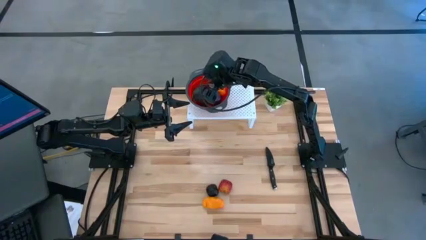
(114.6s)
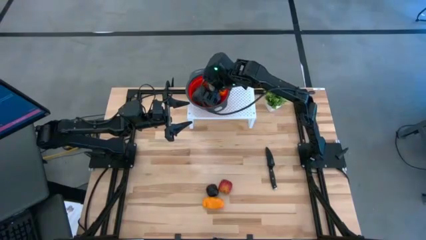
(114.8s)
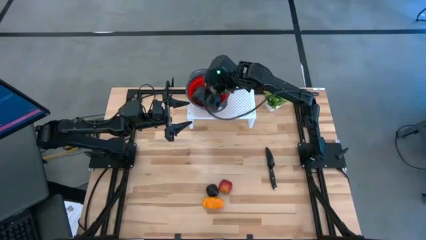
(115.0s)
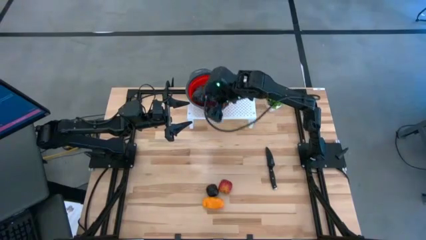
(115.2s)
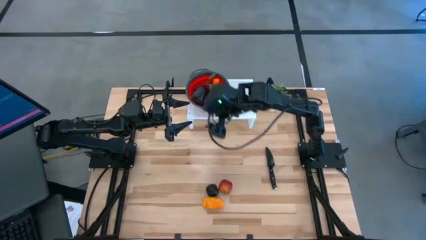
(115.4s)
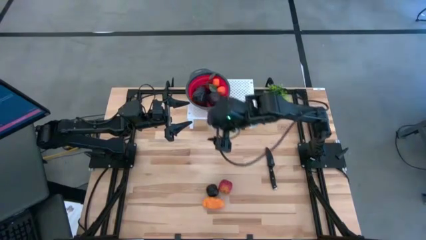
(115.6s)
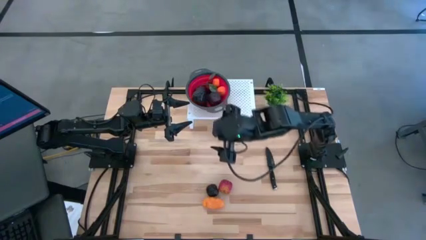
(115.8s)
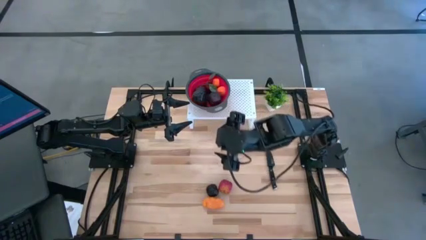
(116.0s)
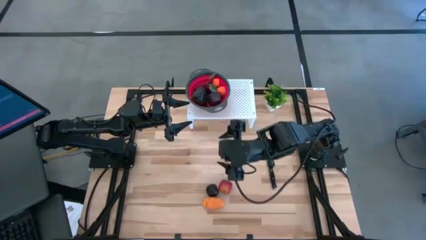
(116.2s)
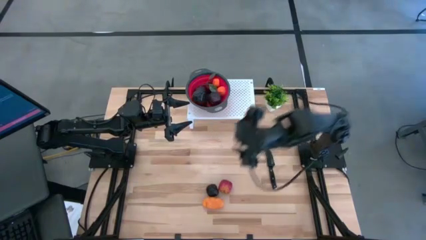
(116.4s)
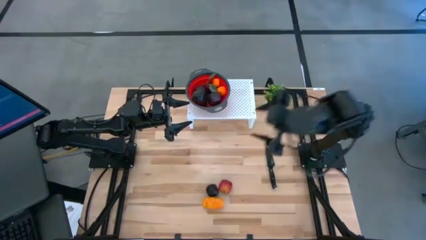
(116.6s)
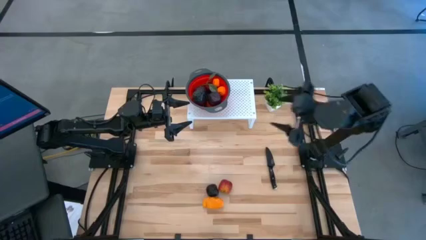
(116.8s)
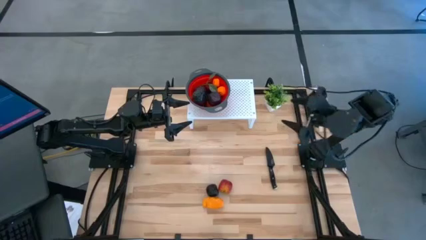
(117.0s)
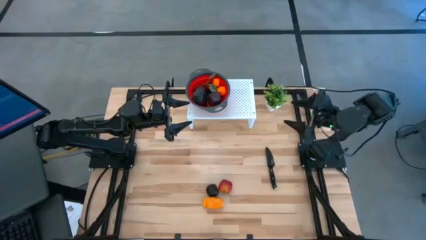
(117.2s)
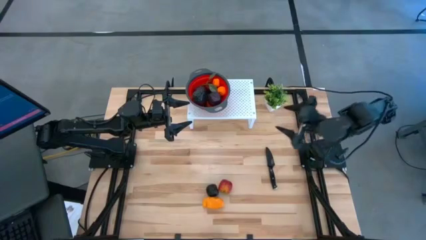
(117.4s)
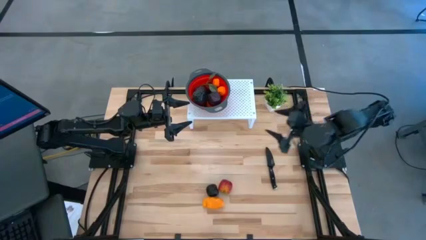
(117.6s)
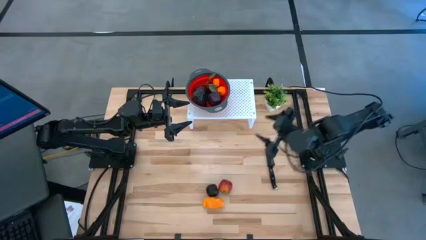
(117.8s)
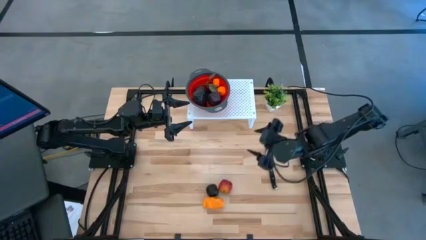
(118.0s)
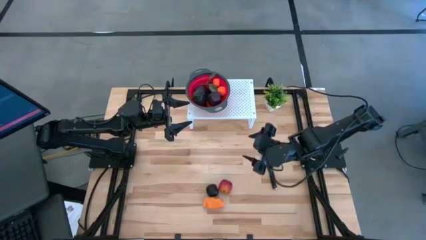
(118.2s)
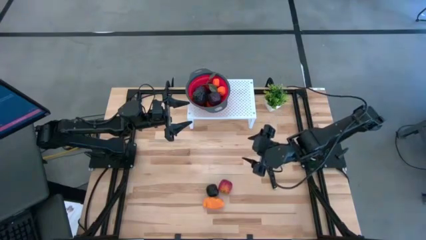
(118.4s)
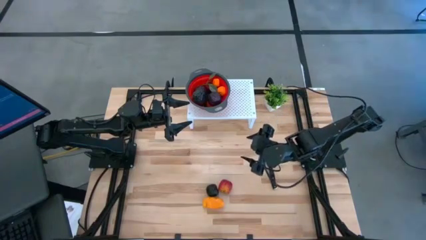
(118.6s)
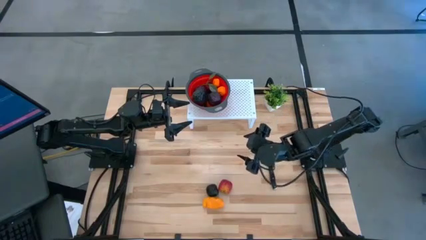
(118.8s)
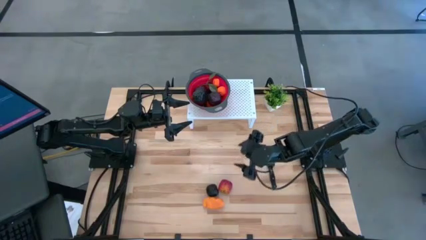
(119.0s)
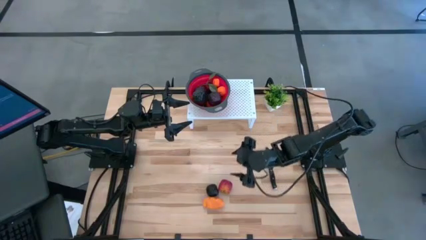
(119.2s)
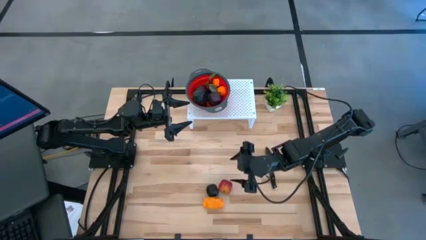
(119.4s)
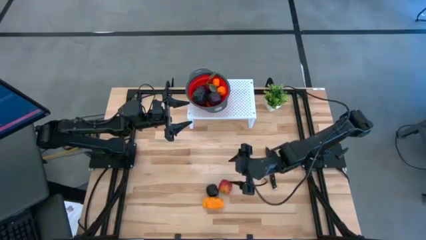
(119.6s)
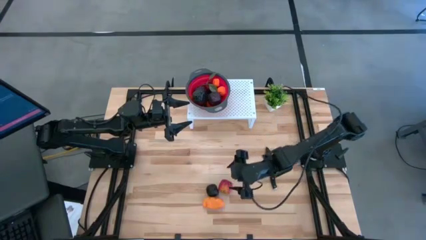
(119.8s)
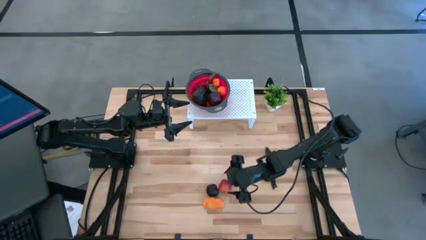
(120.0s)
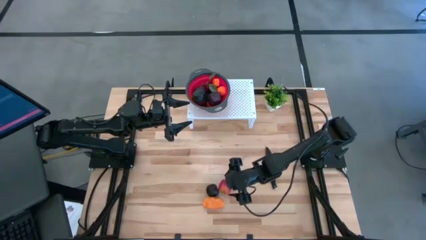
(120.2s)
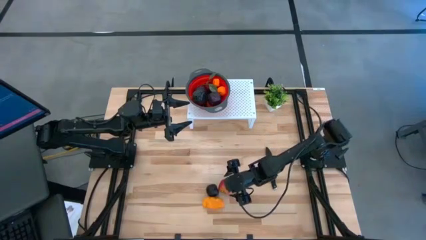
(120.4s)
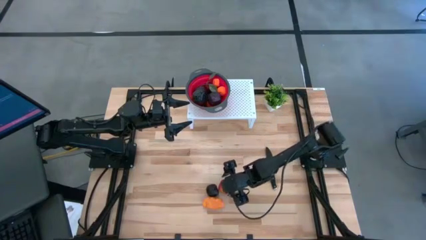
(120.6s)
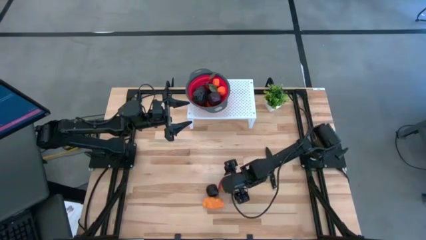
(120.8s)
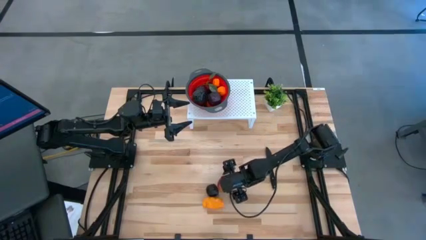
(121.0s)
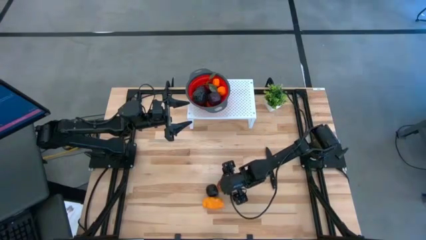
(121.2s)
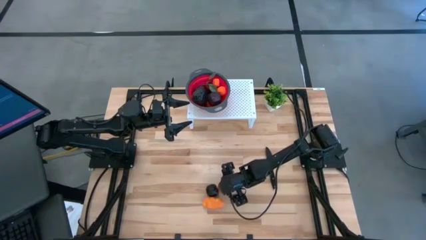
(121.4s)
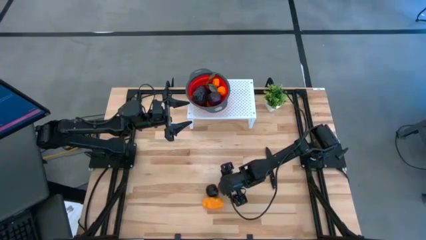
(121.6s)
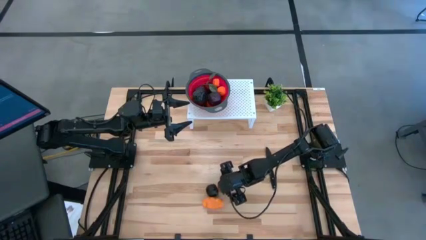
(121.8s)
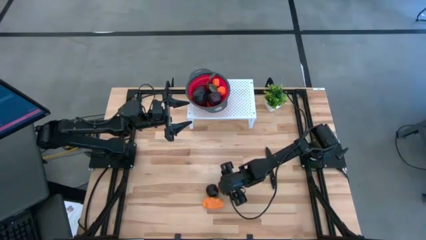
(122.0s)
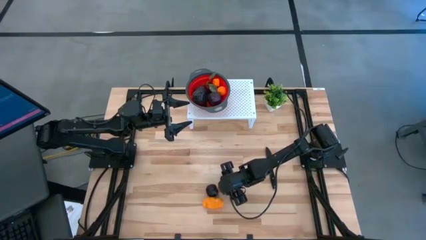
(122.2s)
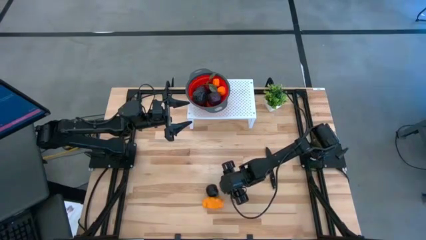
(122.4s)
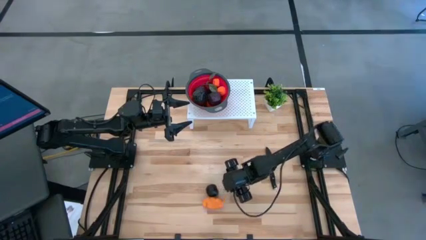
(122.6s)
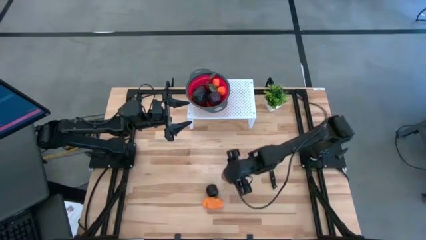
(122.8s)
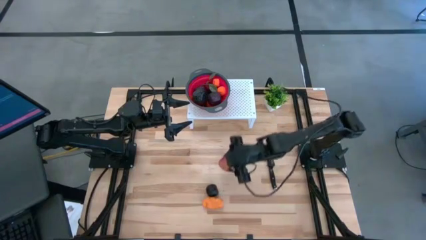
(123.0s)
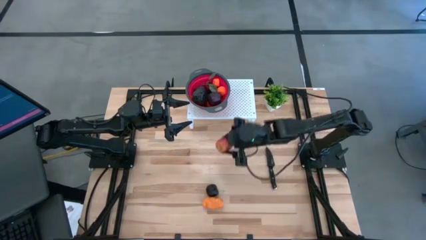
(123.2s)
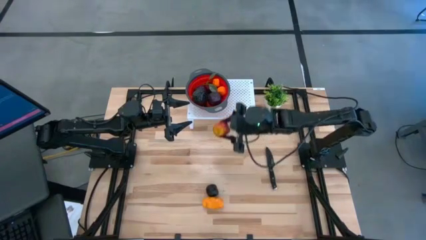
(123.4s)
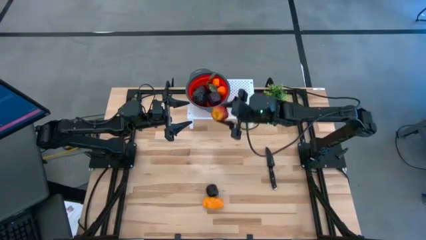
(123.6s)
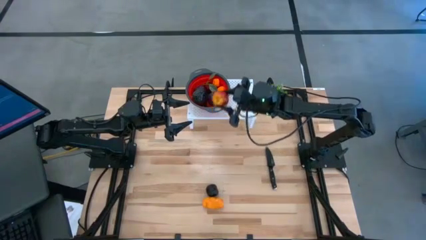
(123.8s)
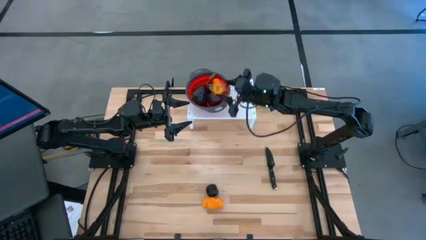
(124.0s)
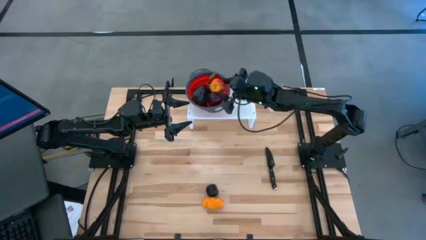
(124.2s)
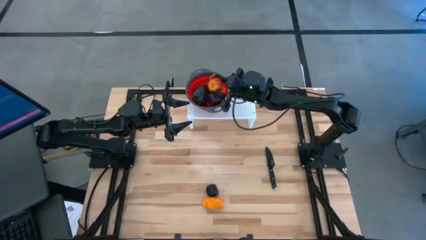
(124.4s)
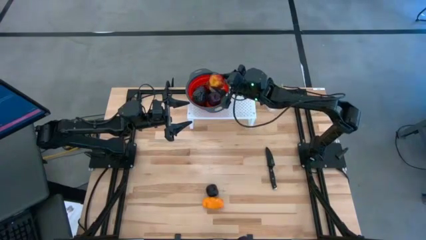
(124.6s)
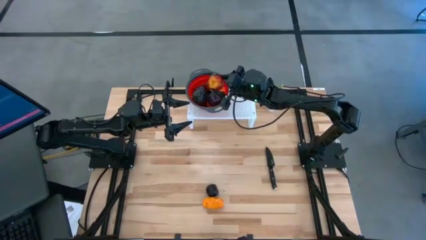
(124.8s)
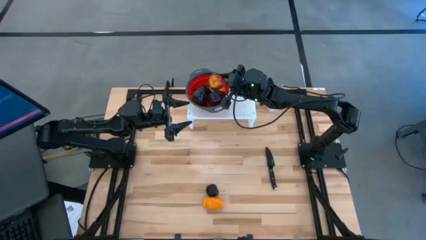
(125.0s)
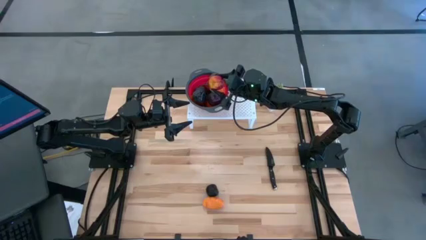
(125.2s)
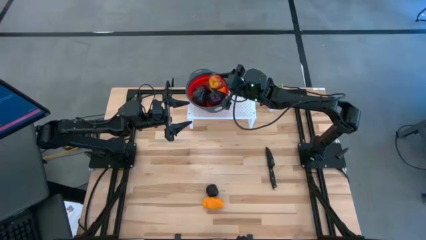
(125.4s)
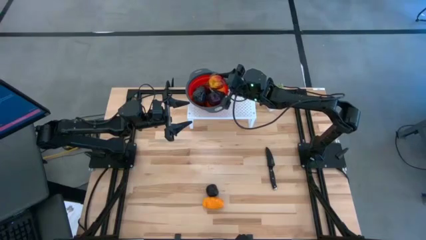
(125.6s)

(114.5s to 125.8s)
Task: Pick & Place Fruit
Put the apple into the strainer bowl on the shelf
